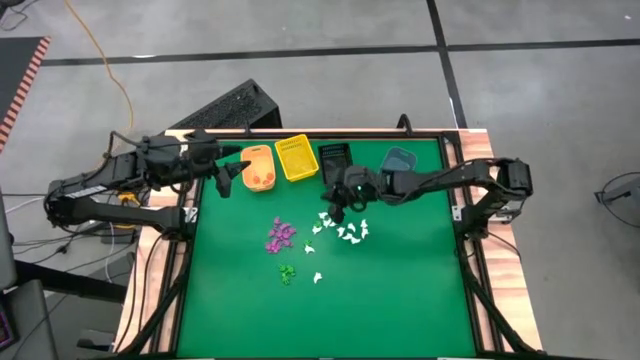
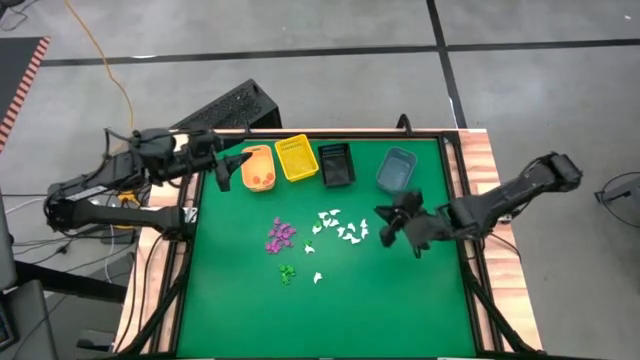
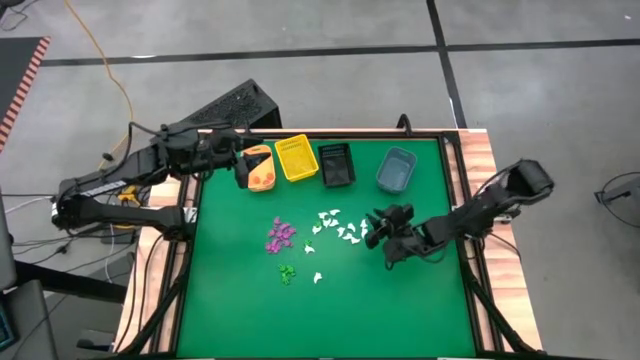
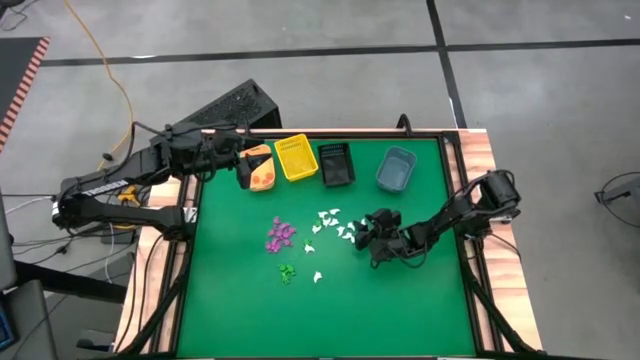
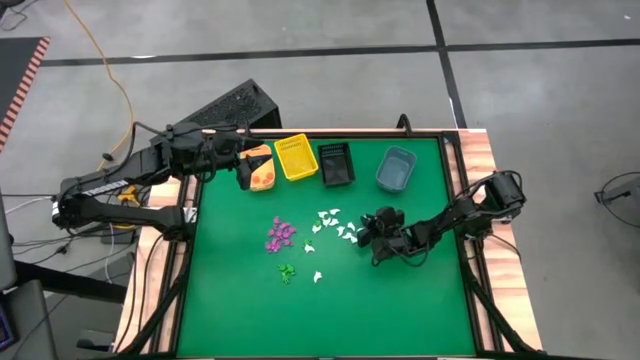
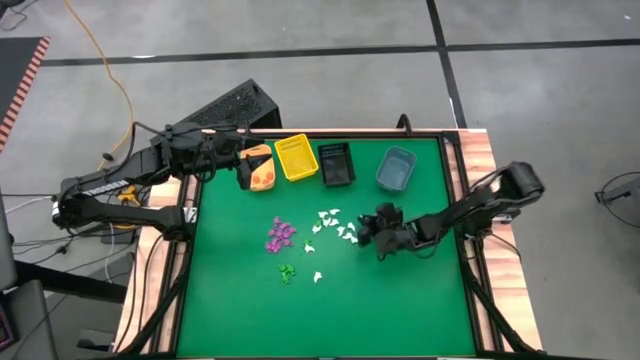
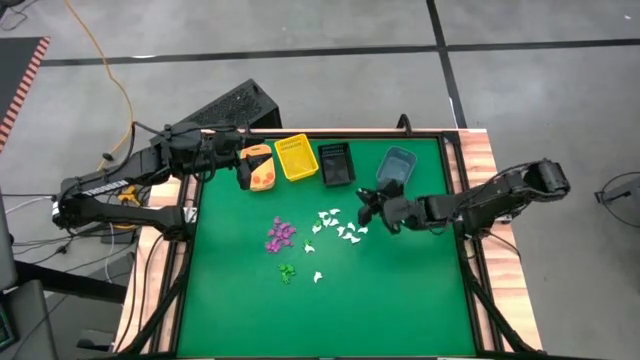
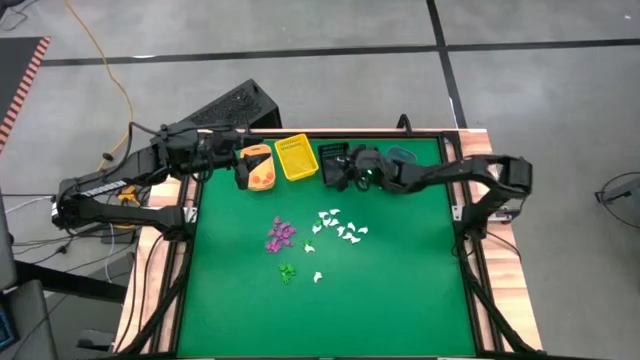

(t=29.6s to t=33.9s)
Task: Sort Halloween decoration
Put the white ghost toy into the black bin

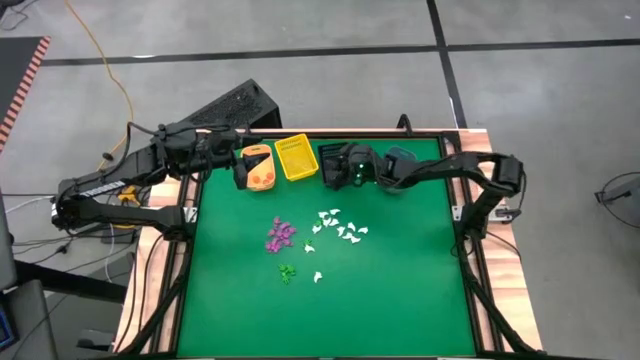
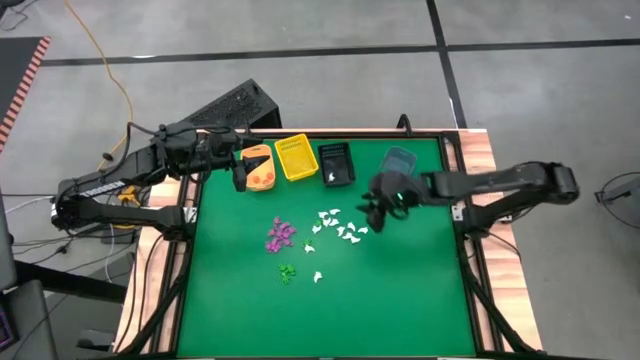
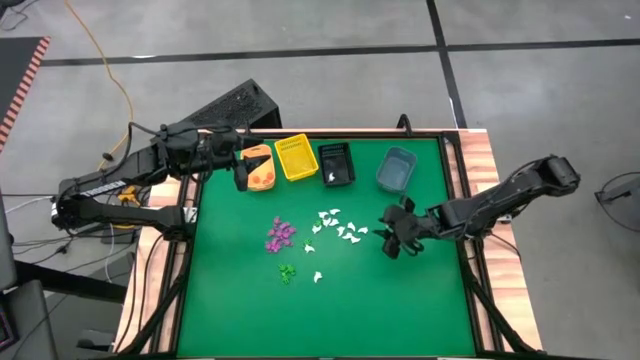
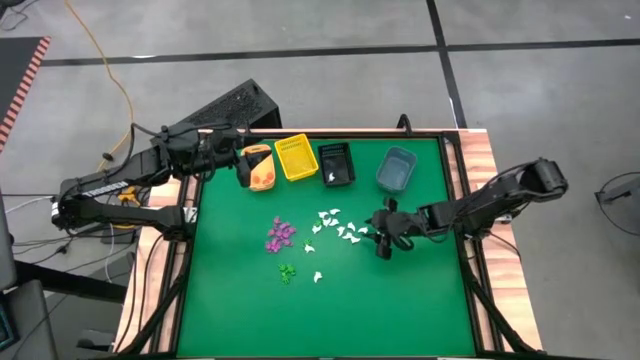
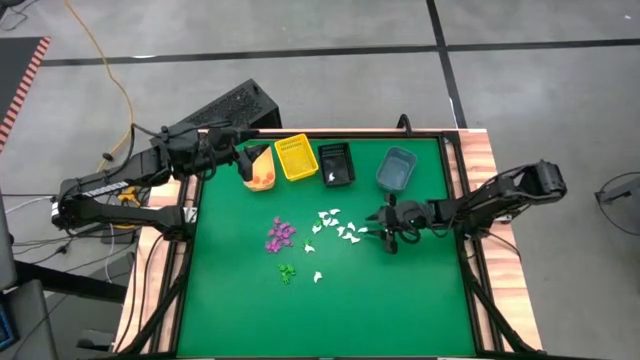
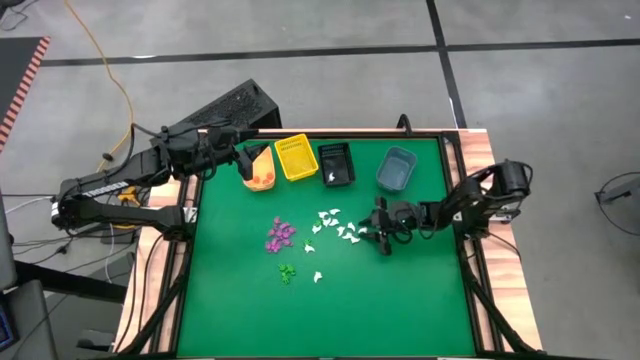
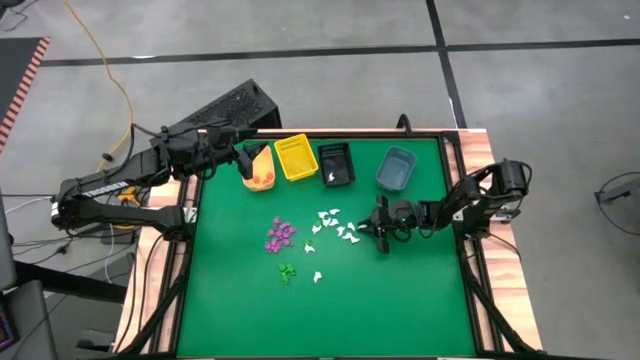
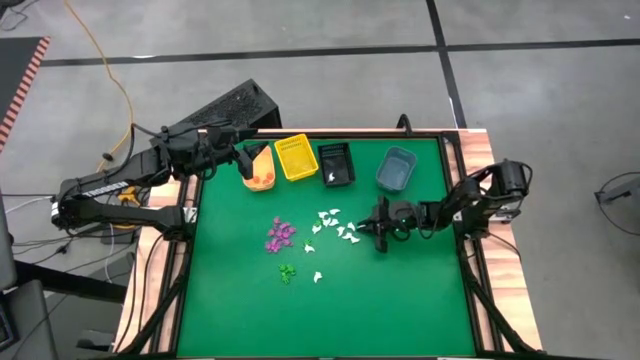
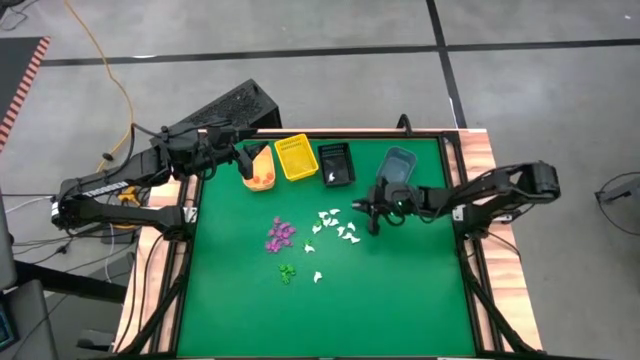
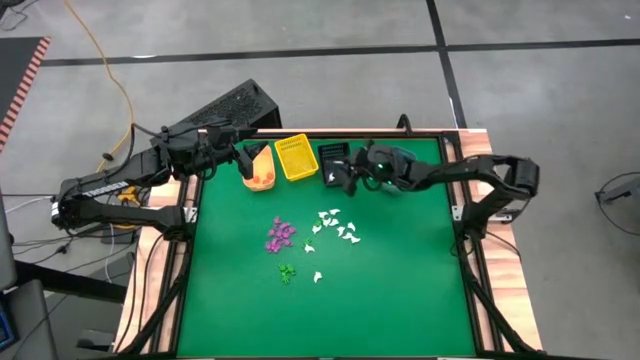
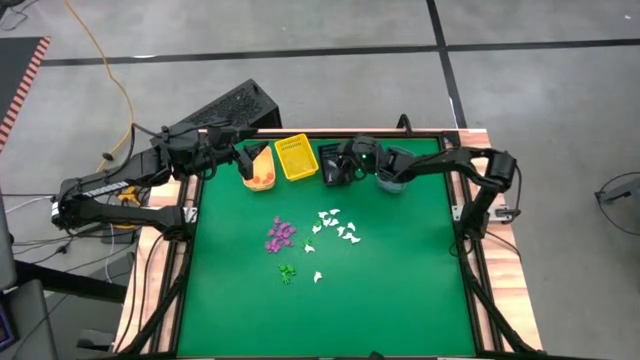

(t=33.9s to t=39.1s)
Put the white ghost toy into the black bin

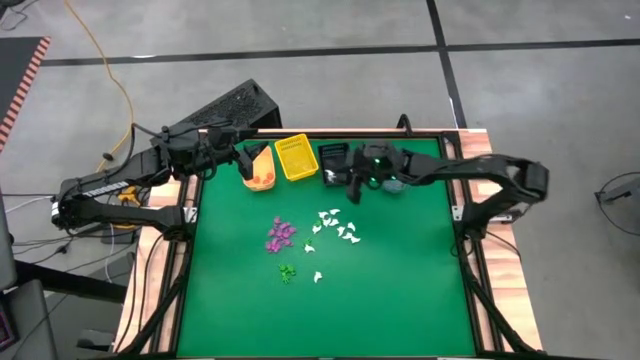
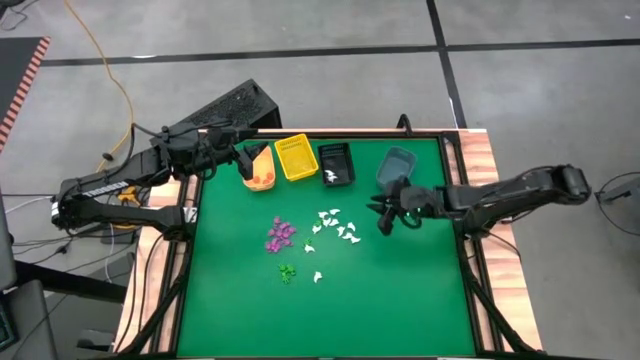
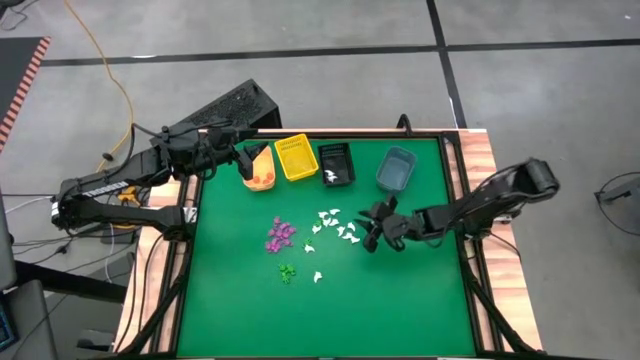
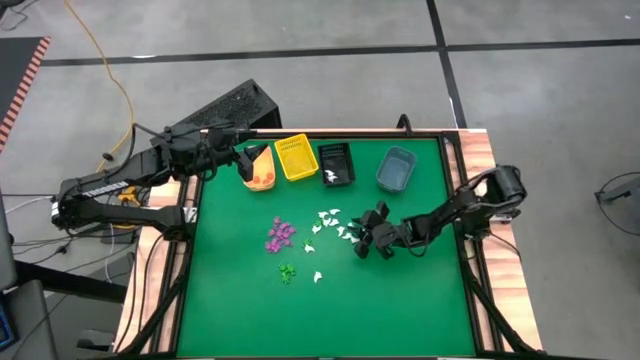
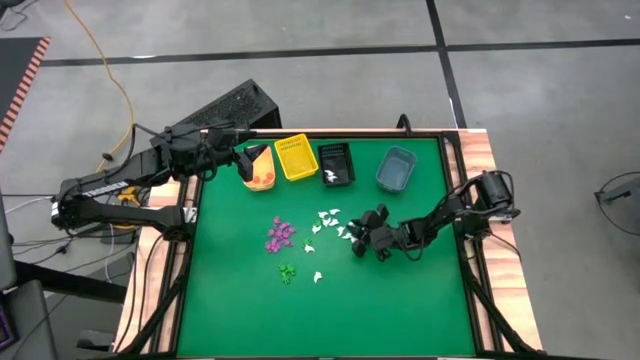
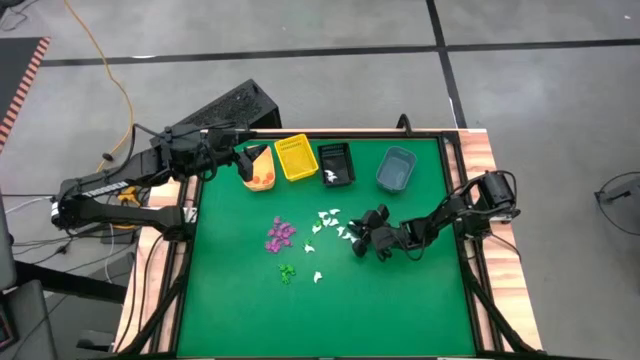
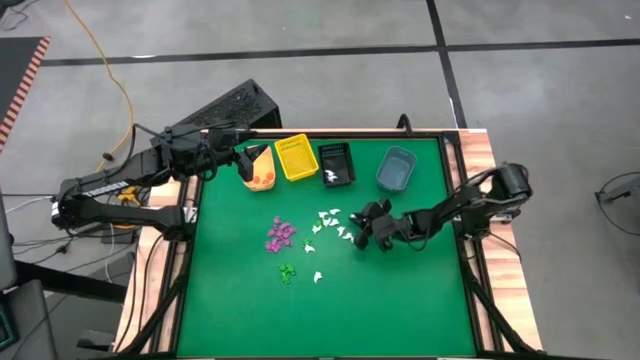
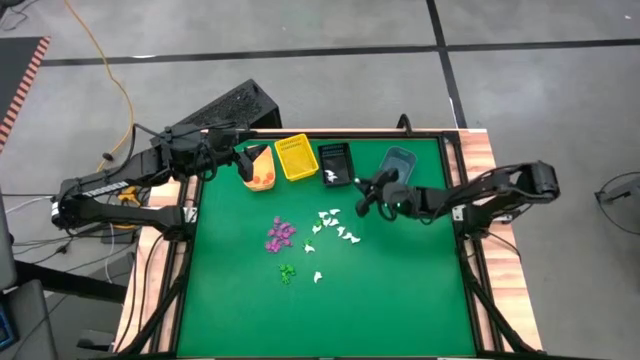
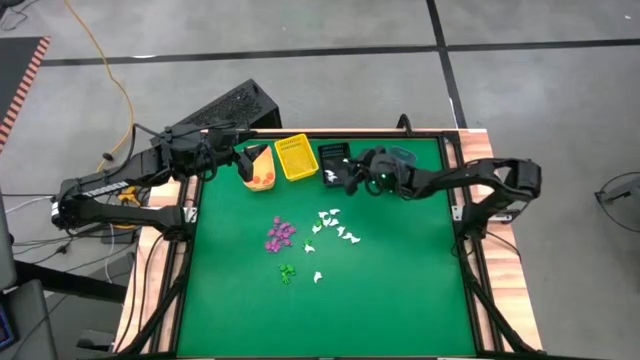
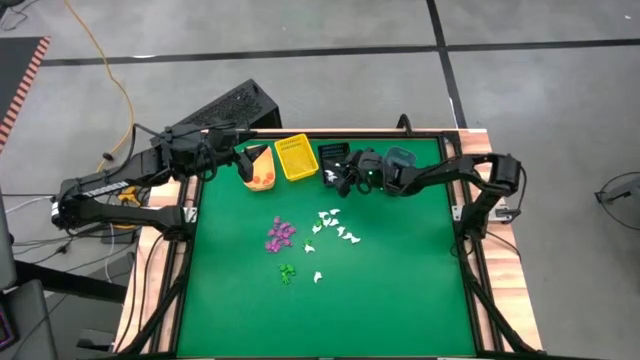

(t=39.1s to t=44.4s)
Put the white ghost toy into the black bin

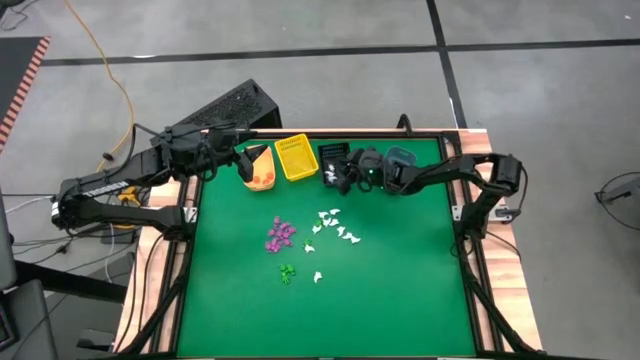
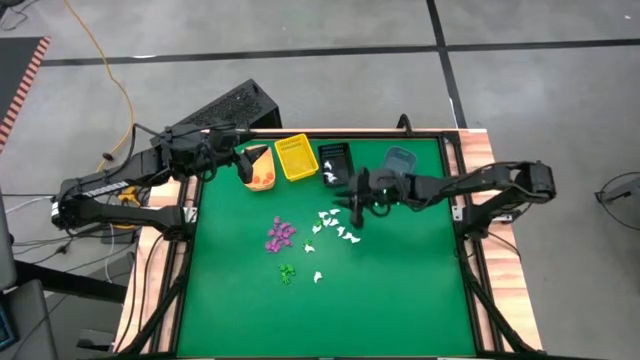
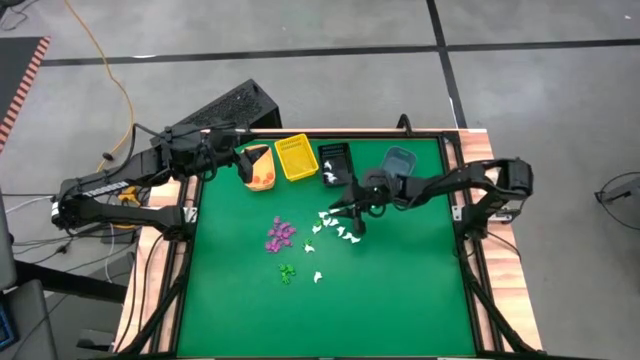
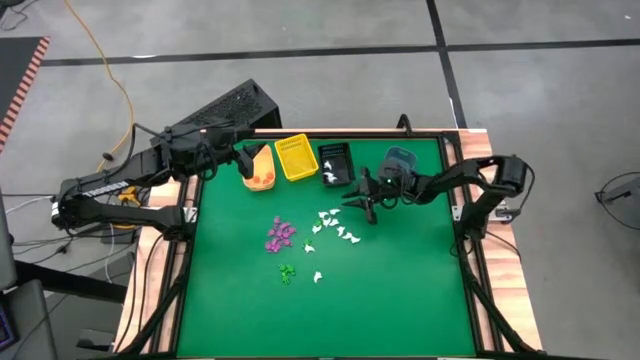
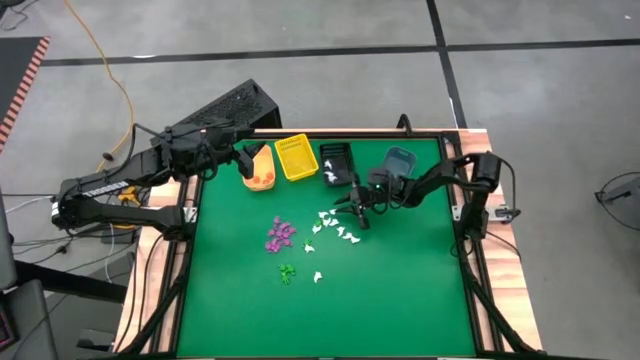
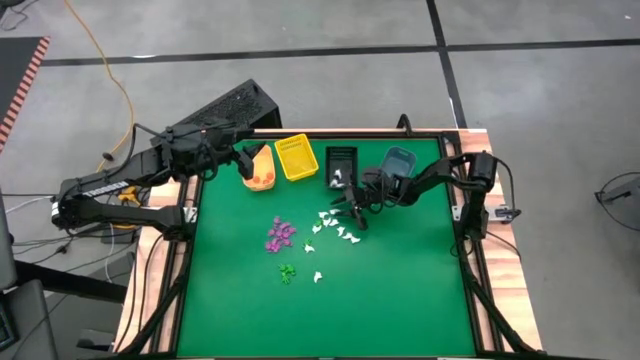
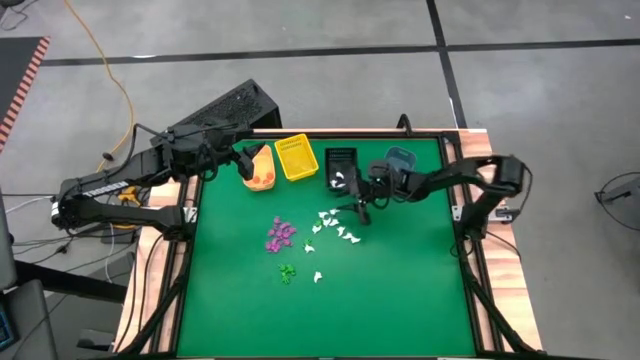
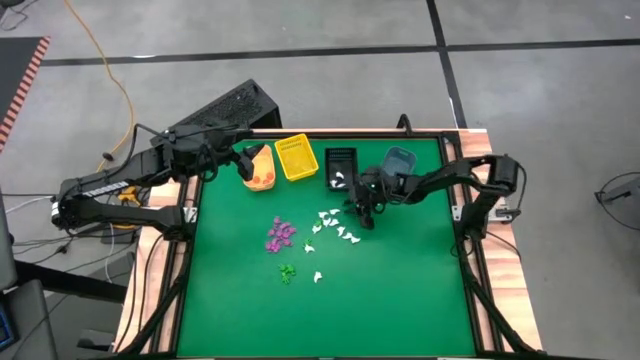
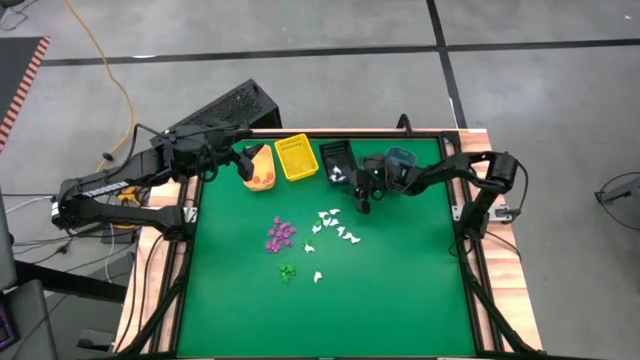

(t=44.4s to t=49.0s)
Adjust the black bin

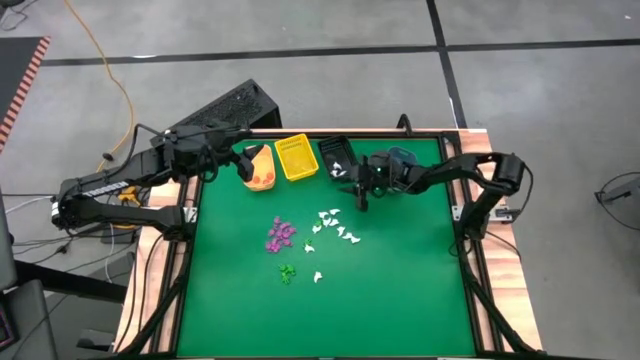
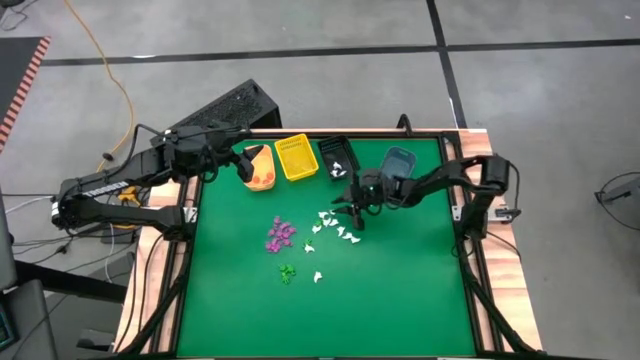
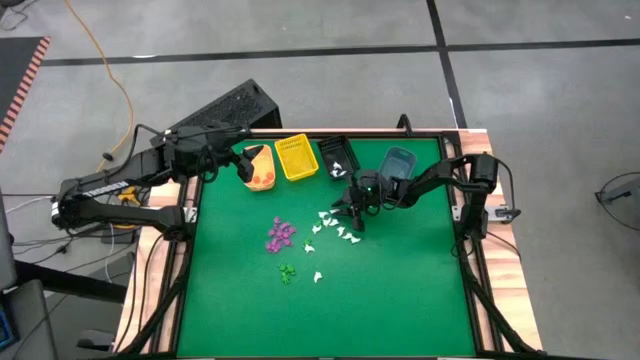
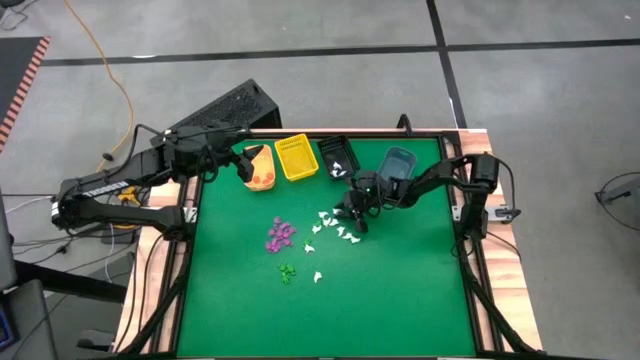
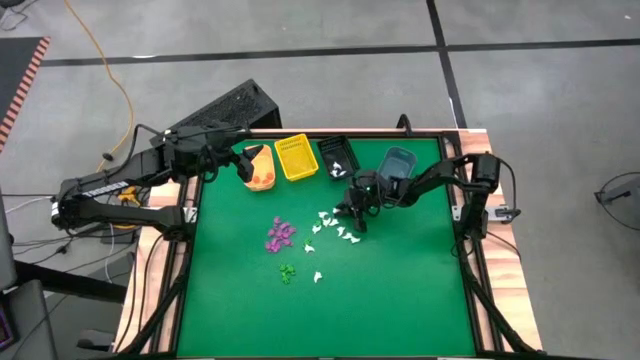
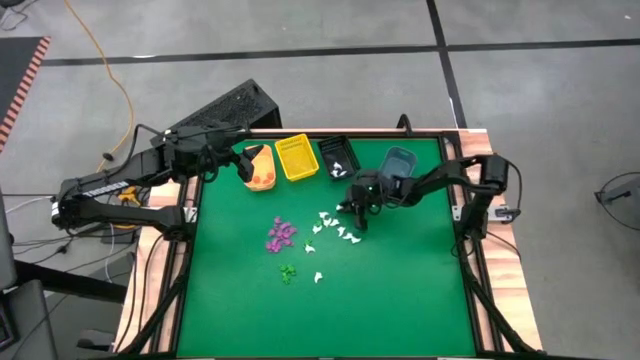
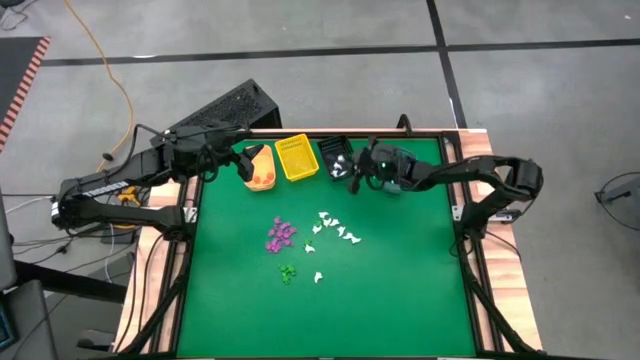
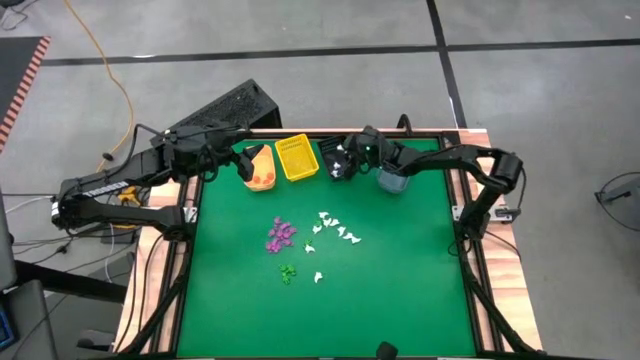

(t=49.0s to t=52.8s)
Put the white ghost toy into the black bin
